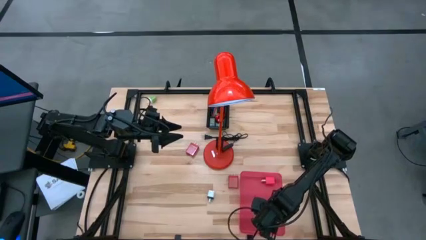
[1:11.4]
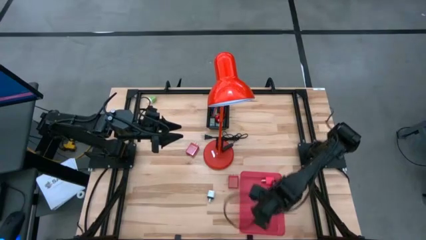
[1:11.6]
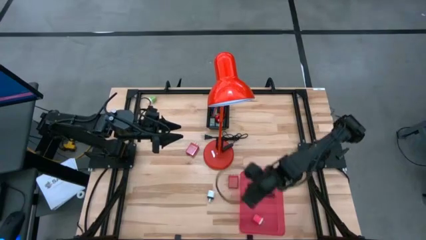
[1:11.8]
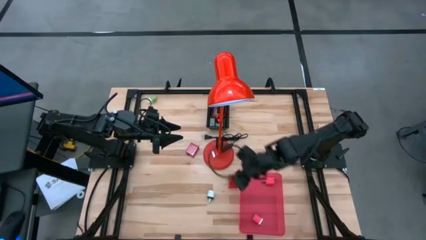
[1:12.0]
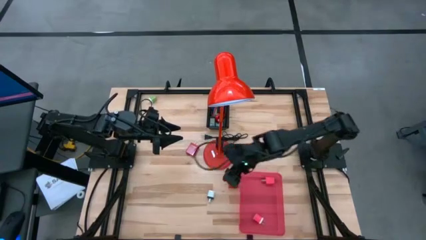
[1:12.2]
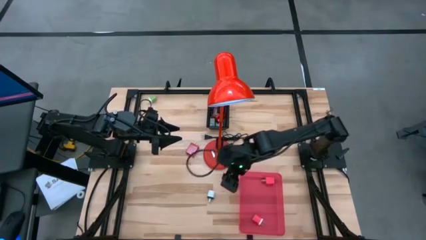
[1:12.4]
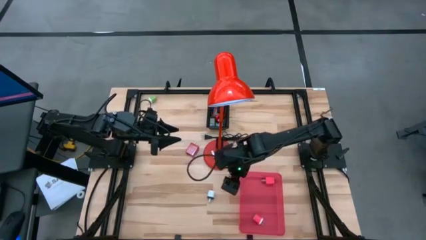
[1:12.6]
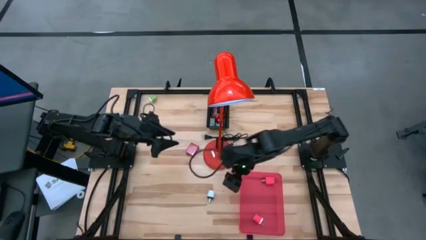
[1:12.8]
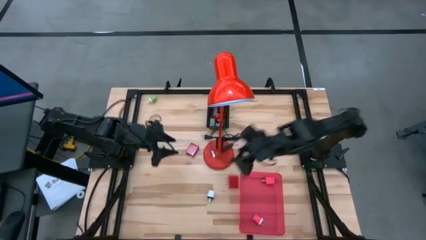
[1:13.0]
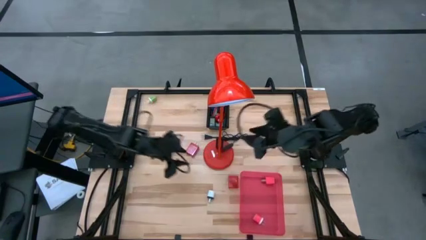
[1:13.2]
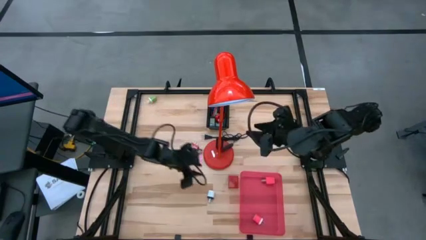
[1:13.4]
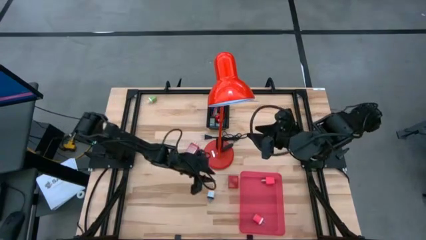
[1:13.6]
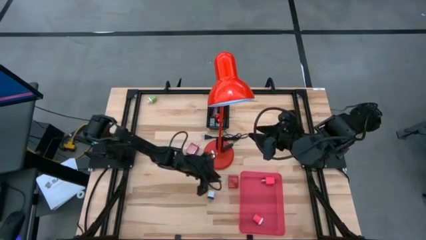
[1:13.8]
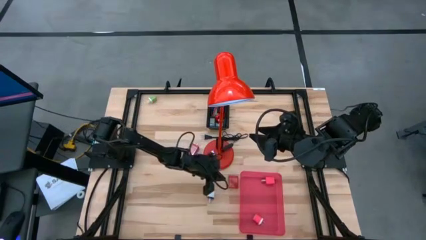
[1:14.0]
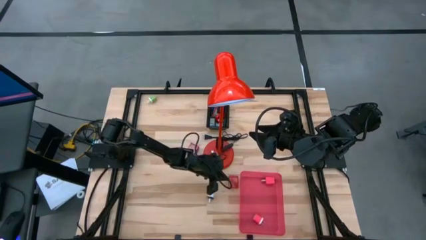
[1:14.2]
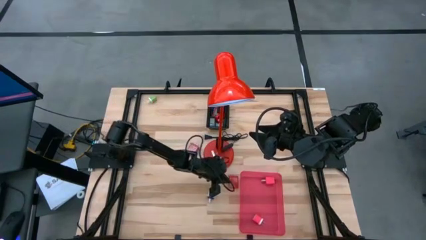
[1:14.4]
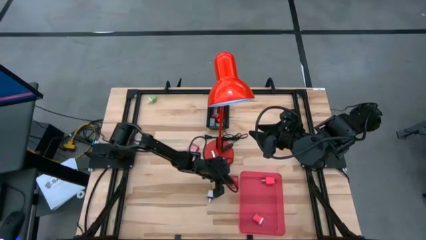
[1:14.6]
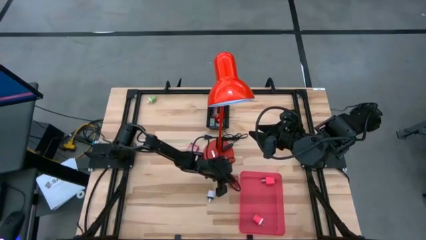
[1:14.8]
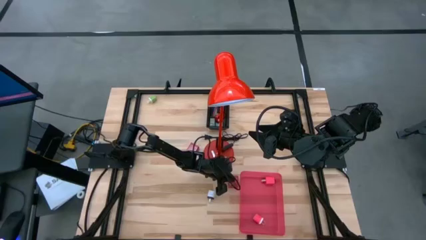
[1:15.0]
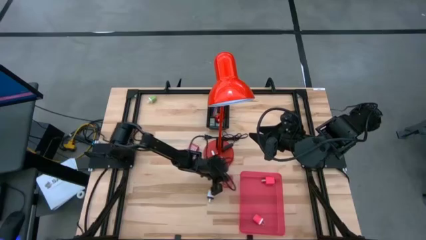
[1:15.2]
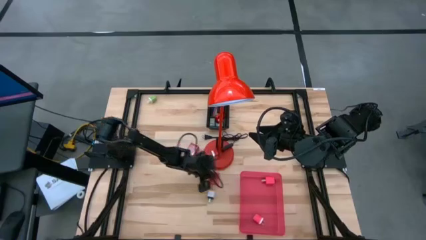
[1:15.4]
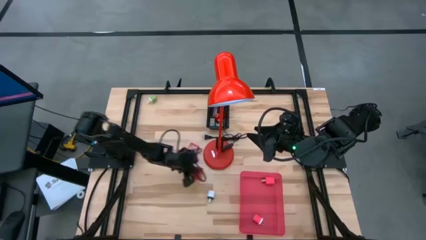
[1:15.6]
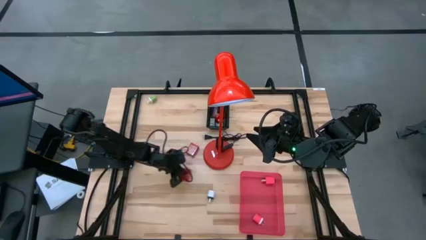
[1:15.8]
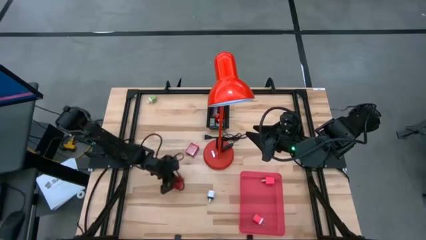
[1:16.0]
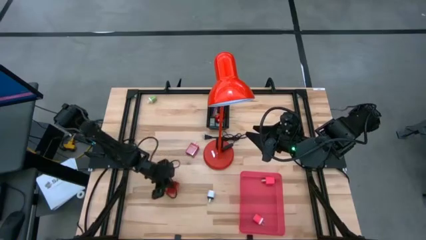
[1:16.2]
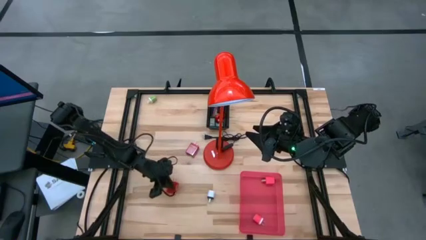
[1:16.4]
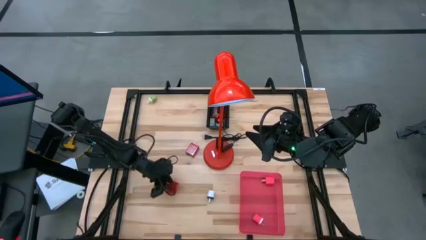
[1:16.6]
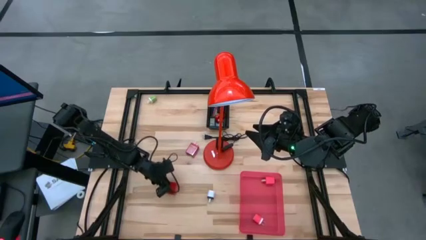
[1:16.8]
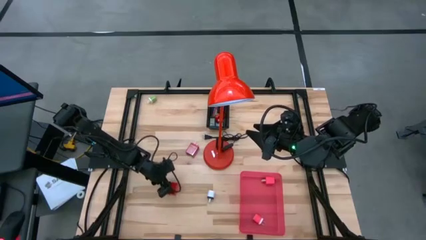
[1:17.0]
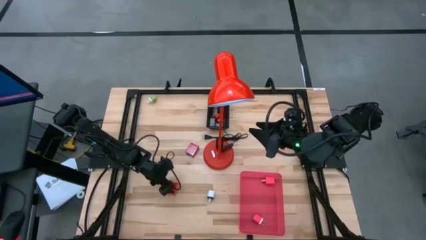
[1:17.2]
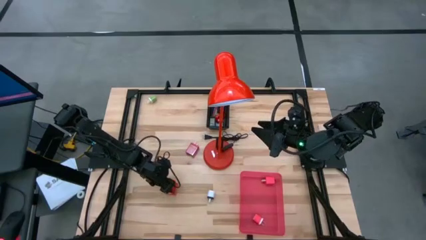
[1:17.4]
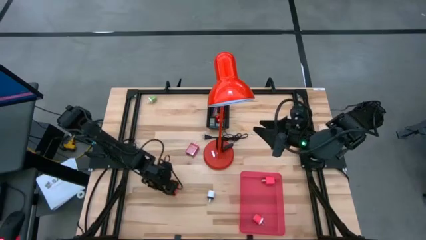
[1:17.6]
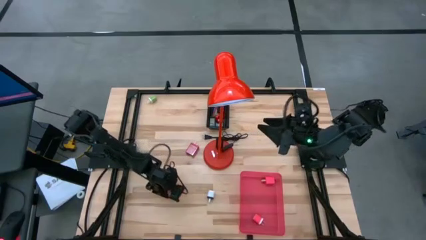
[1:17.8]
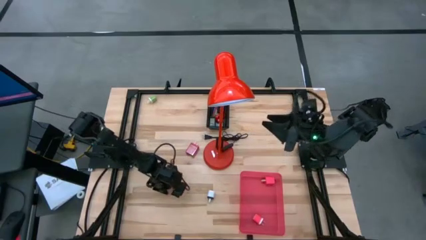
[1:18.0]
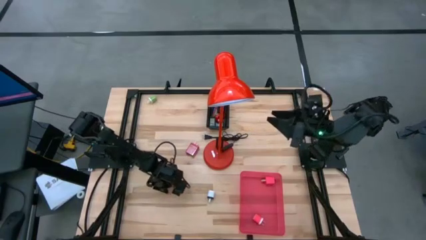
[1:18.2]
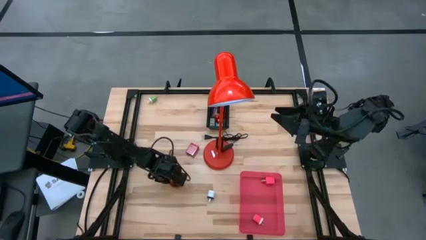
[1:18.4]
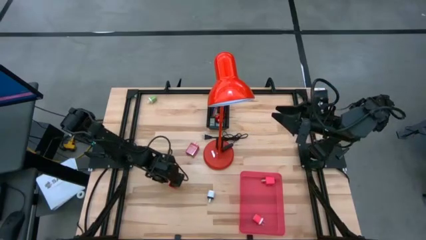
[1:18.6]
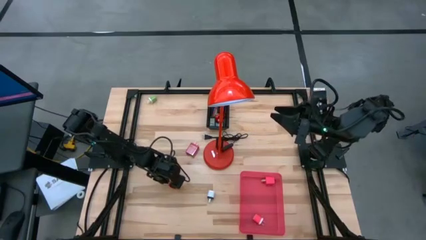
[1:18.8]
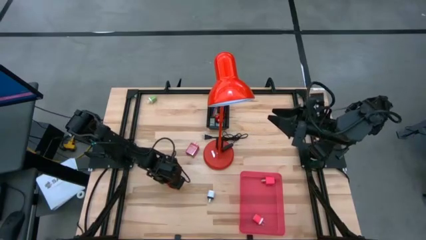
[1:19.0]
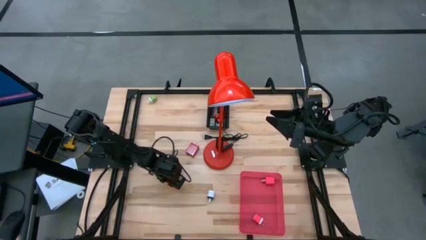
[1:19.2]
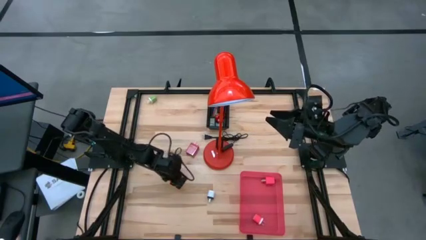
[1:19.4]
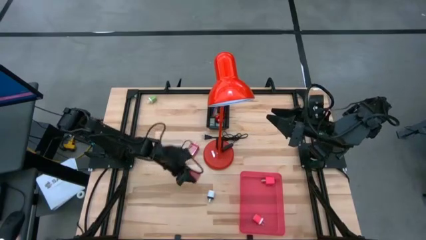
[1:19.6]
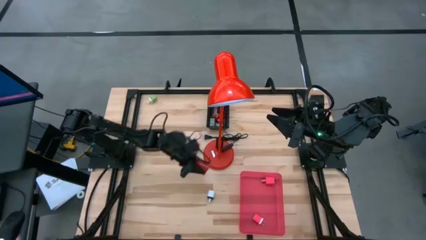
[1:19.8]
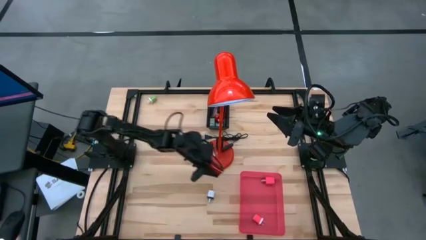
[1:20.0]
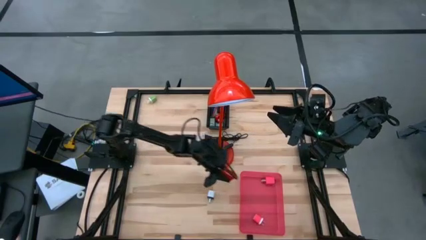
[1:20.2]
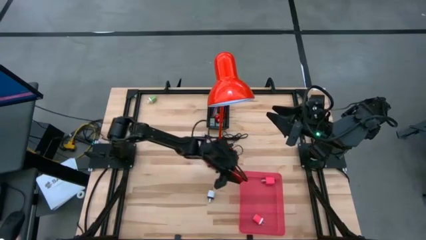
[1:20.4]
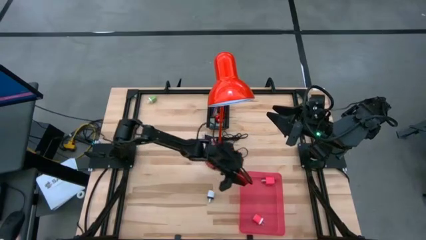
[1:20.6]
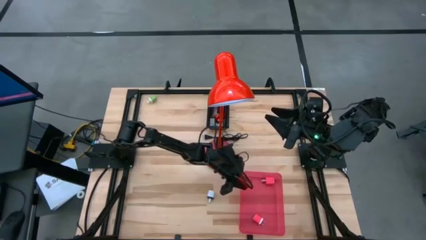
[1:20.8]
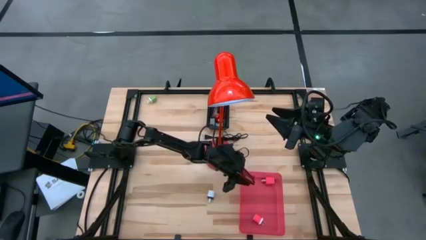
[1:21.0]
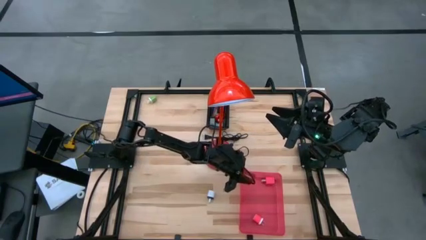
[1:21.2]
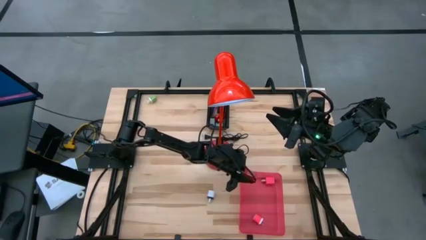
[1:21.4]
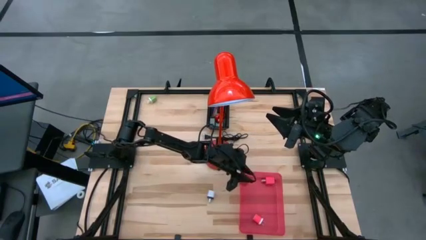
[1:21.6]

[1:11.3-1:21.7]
Task: Pick & Place Office items
Put the bottom red charger adapter into the red bin

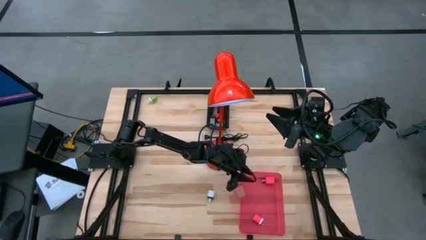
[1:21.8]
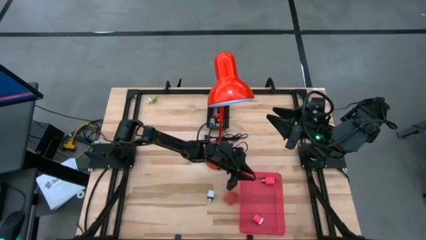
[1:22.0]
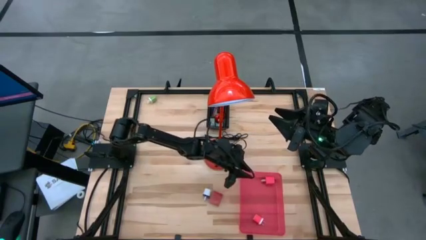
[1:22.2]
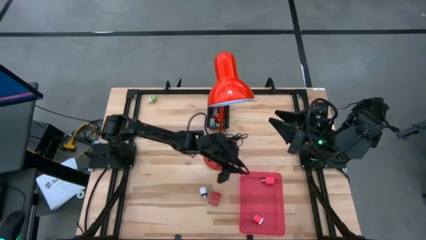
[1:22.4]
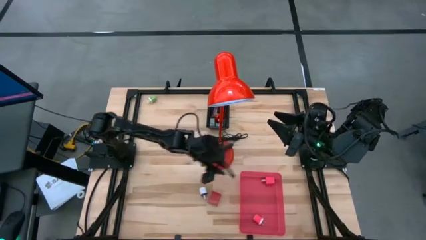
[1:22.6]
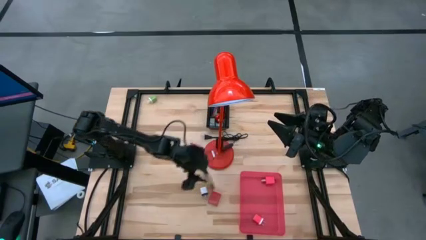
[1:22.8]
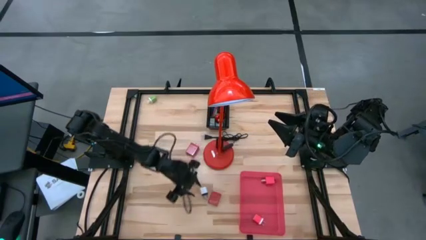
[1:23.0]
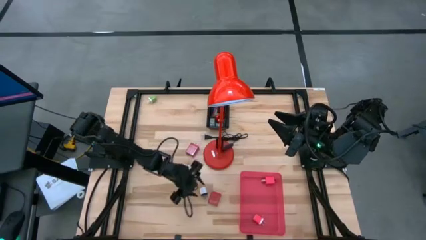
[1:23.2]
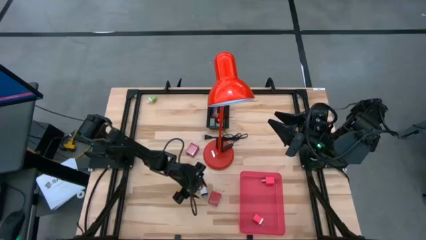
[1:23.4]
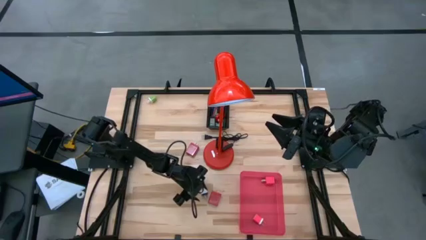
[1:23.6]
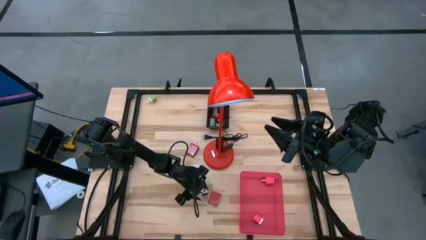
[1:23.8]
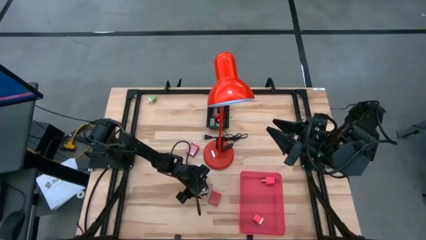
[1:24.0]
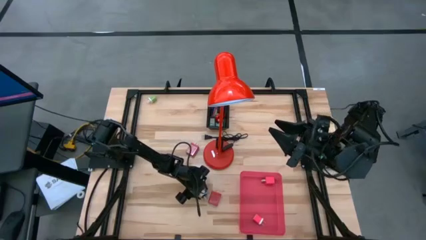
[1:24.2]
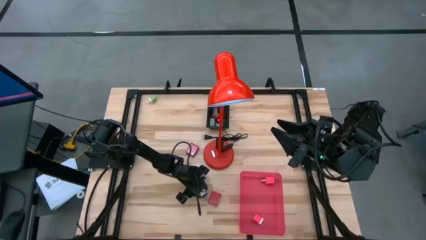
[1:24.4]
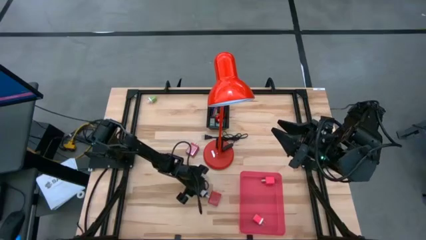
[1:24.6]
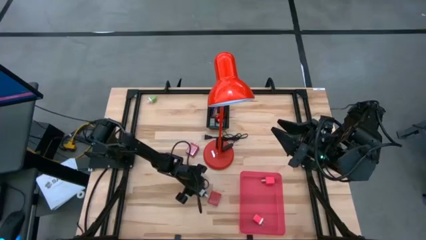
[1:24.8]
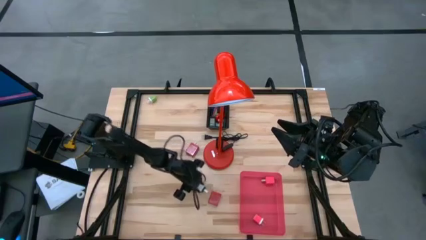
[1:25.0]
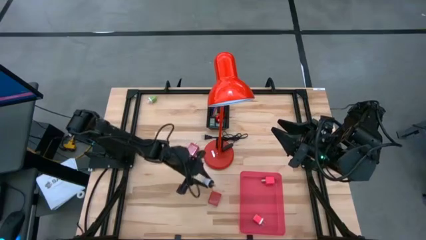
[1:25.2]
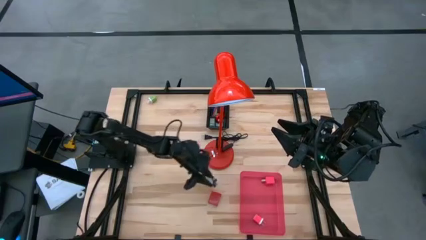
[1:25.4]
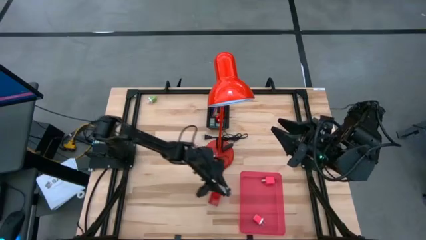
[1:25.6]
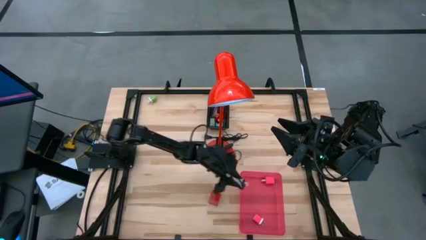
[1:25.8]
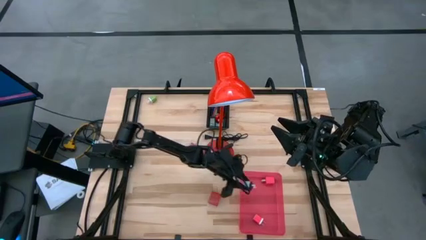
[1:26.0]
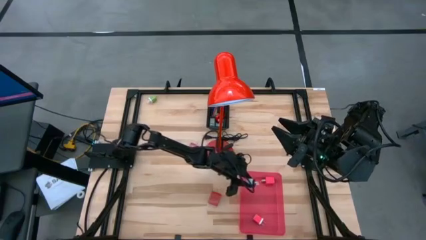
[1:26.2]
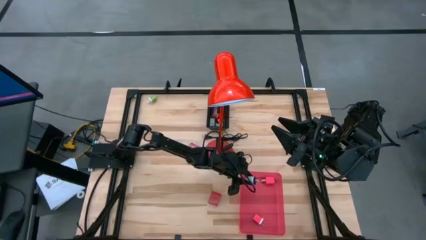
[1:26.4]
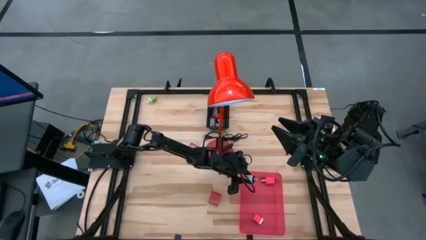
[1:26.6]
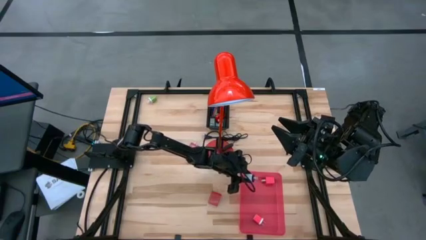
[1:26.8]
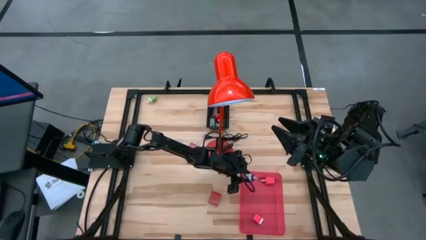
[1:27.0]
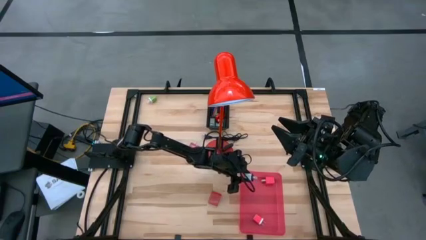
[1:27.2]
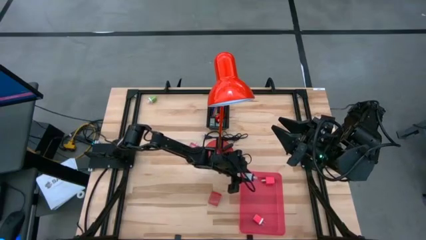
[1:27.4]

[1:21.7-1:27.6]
Put the white charger adapter into the red bin
